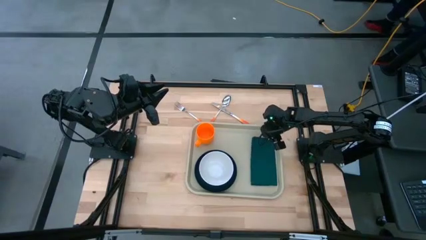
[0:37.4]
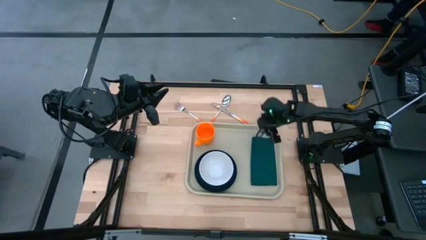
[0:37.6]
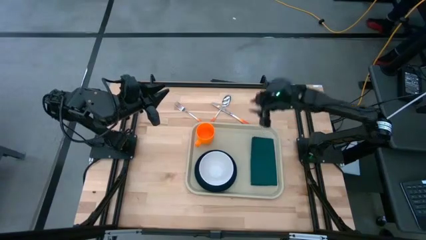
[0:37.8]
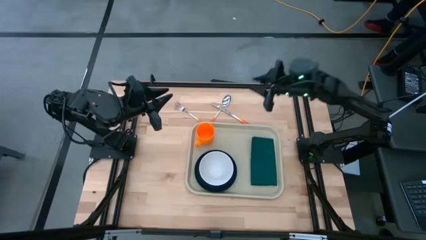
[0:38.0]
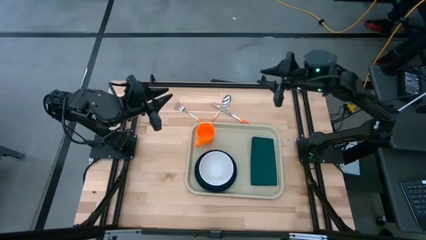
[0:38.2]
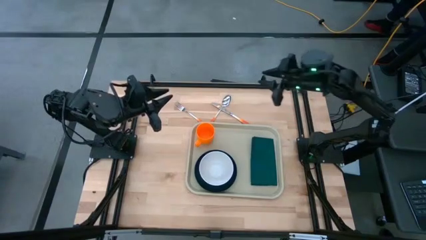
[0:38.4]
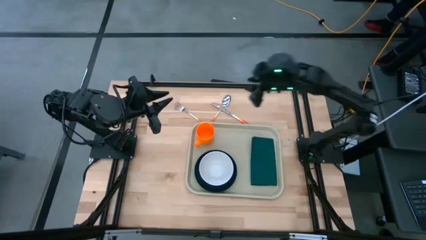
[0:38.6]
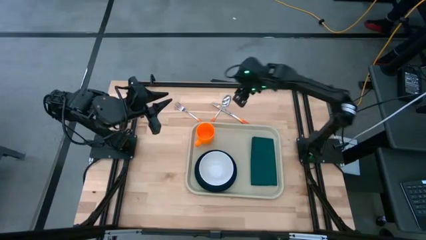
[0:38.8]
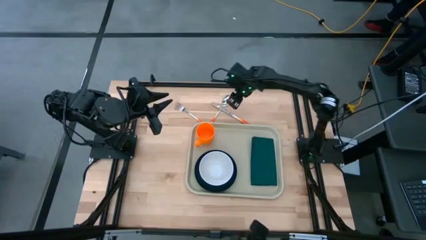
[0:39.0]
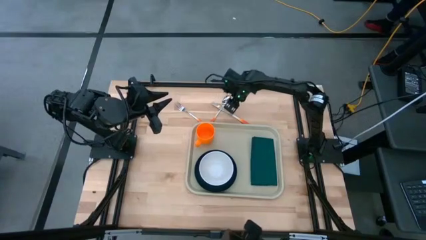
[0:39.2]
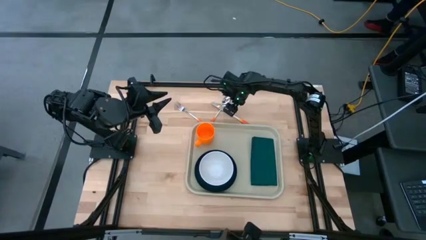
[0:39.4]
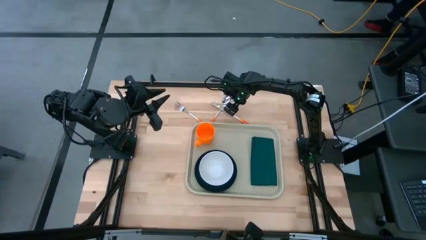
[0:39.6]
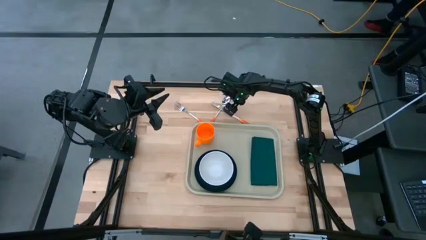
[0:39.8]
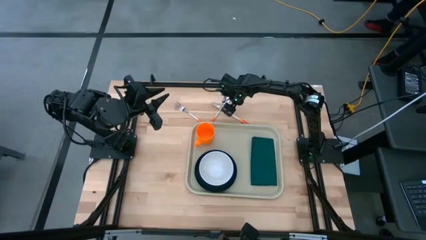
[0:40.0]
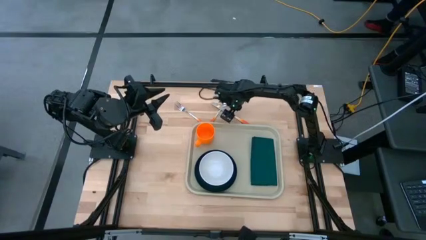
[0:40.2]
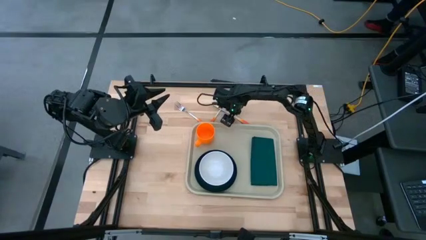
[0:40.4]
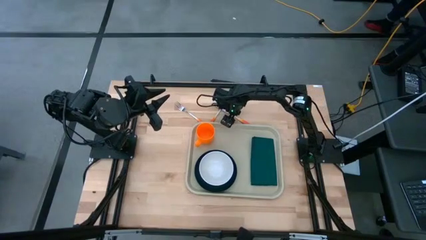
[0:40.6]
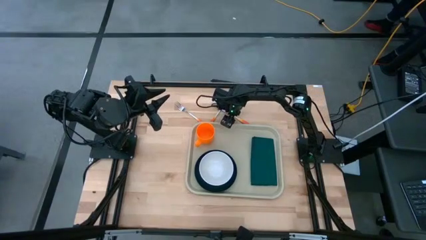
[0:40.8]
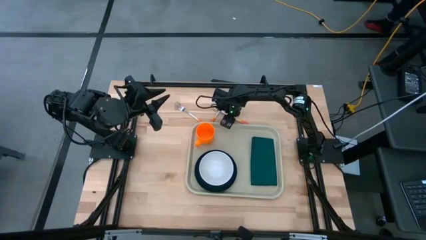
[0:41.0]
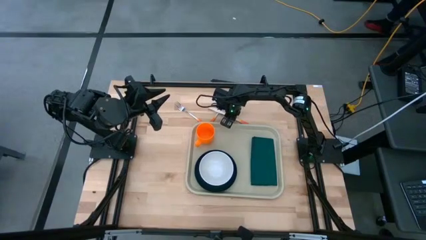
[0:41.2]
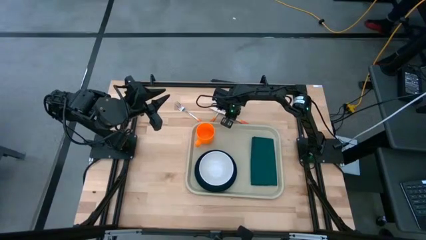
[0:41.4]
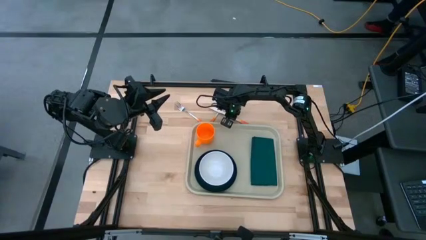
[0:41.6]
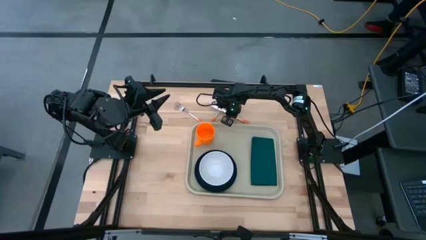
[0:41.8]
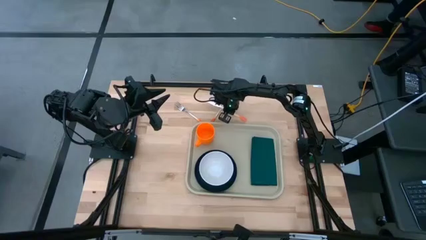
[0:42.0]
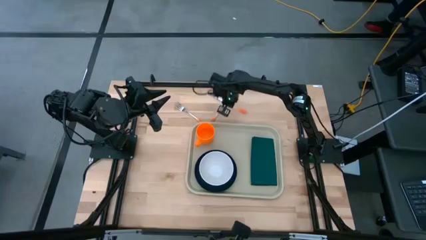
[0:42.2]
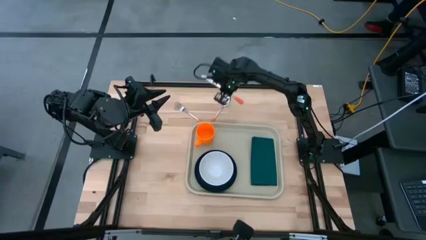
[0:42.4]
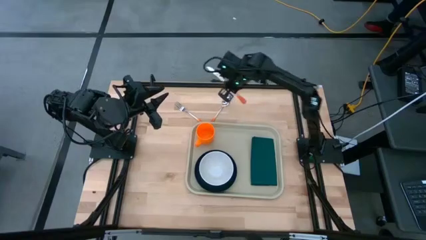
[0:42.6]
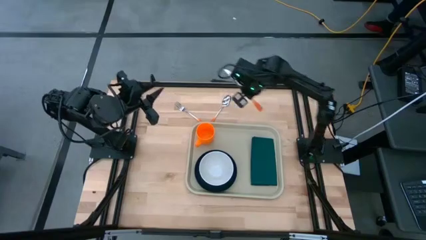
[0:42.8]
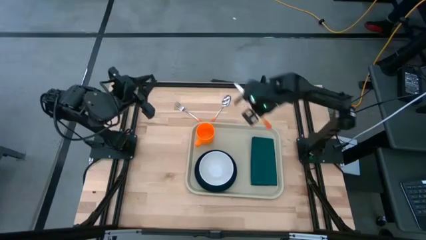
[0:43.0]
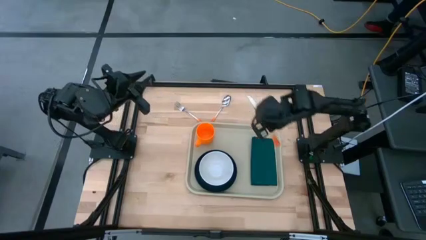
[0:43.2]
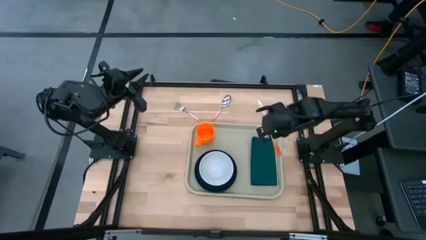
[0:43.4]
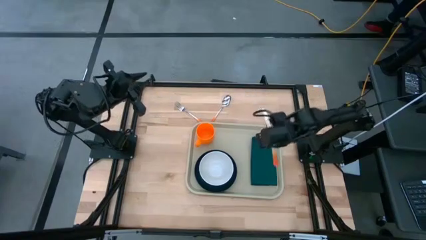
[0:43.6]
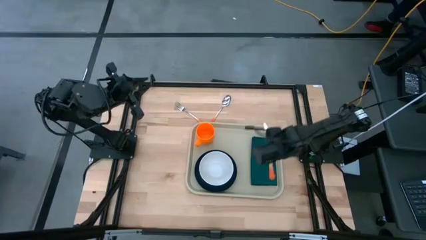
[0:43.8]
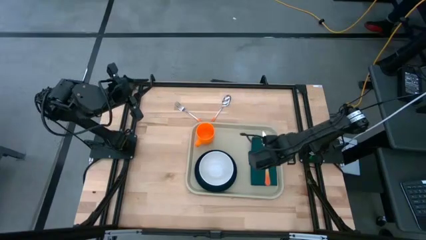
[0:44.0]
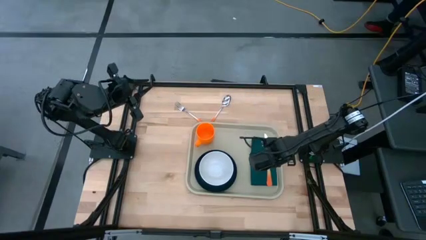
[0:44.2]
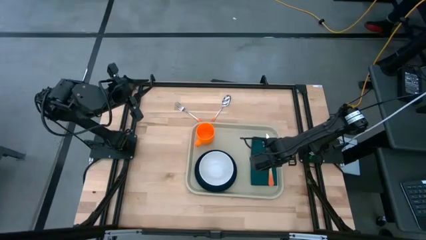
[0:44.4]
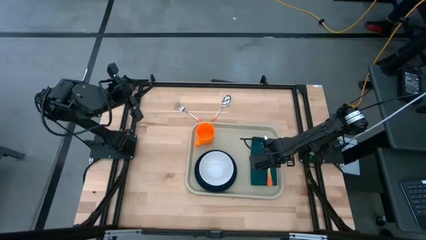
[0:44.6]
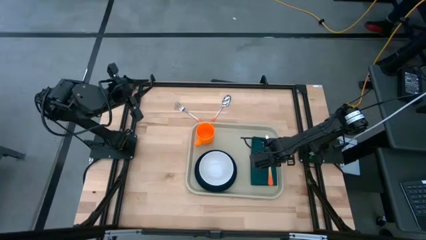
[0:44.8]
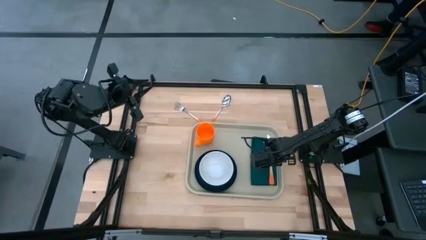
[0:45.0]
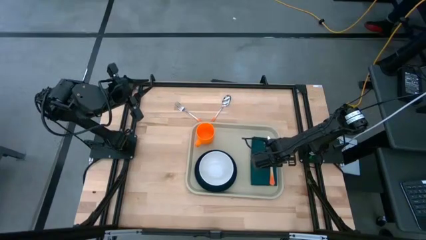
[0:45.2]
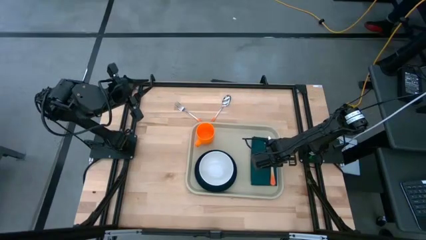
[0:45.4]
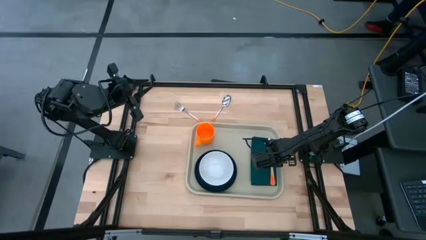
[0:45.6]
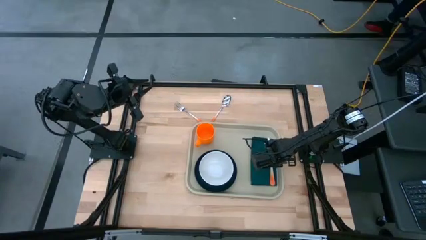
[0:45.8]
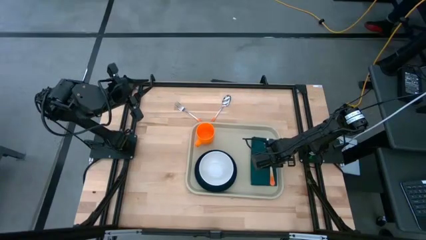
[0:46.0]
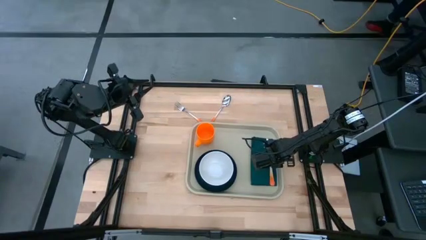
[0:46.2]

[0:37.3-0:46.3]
Task: Set up tray
Put the orange knife on the green napkin

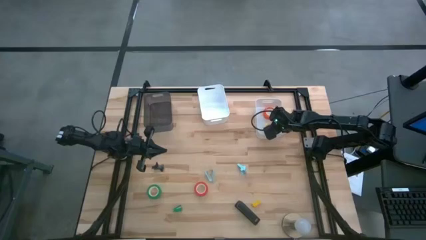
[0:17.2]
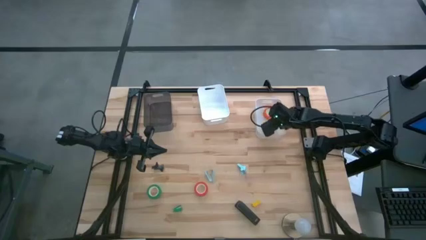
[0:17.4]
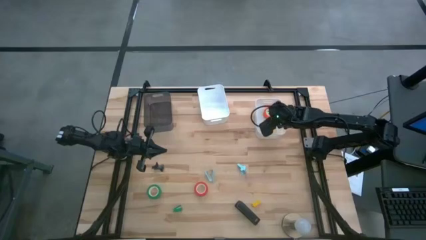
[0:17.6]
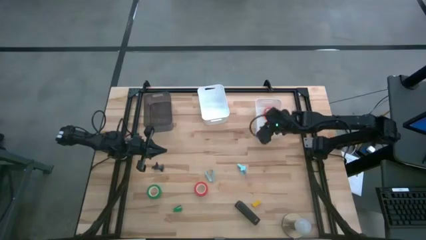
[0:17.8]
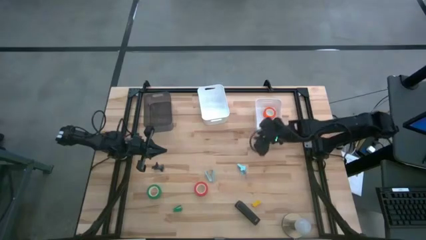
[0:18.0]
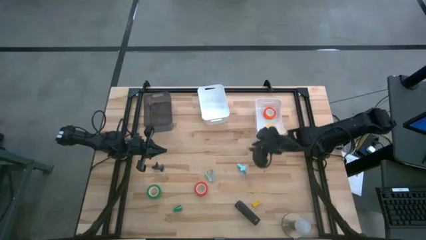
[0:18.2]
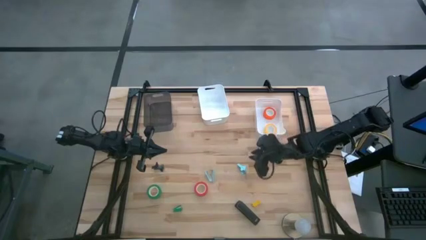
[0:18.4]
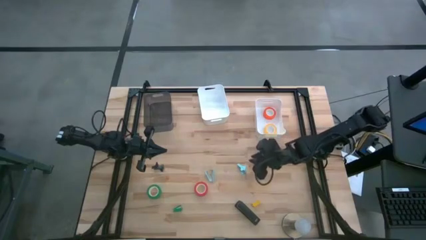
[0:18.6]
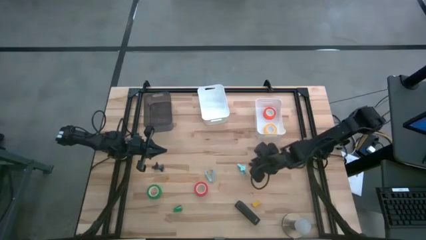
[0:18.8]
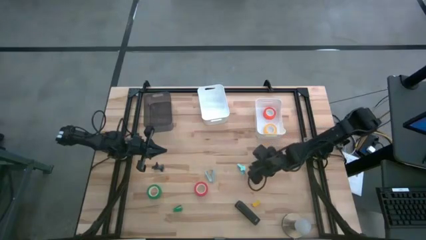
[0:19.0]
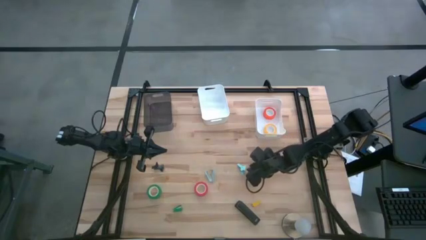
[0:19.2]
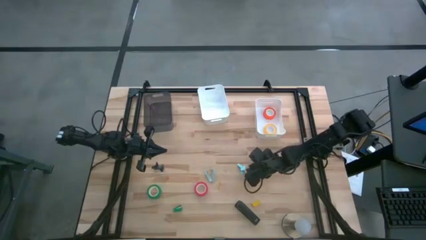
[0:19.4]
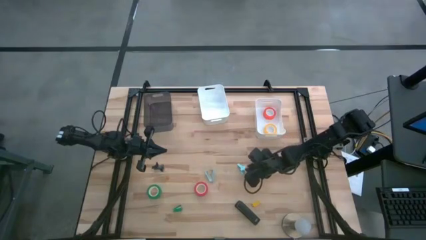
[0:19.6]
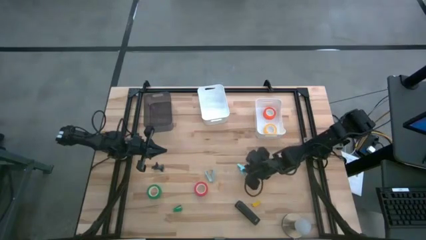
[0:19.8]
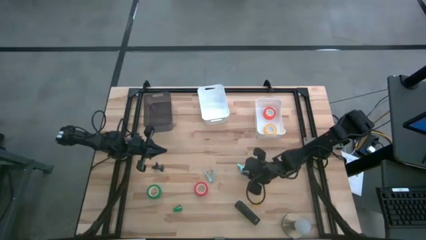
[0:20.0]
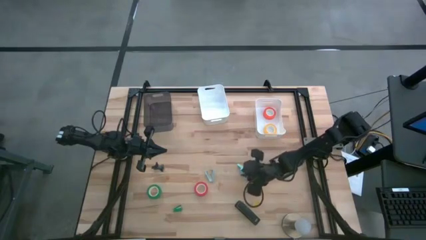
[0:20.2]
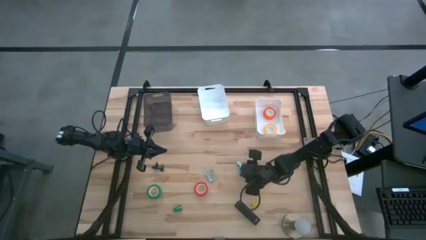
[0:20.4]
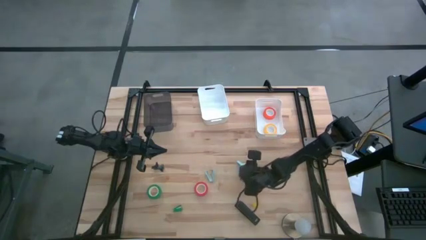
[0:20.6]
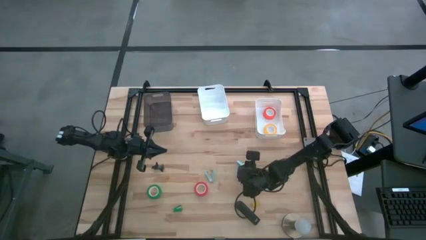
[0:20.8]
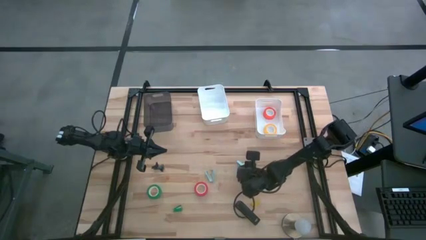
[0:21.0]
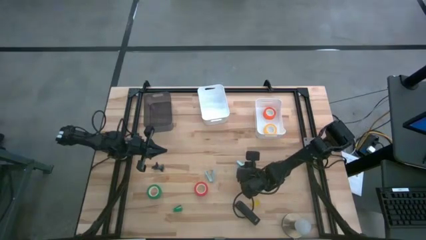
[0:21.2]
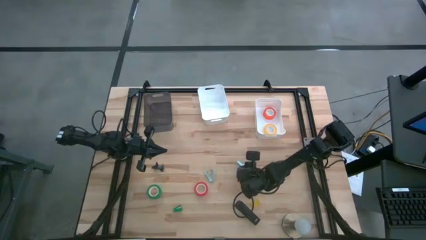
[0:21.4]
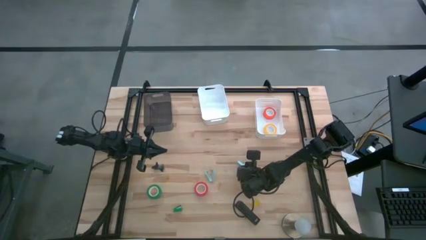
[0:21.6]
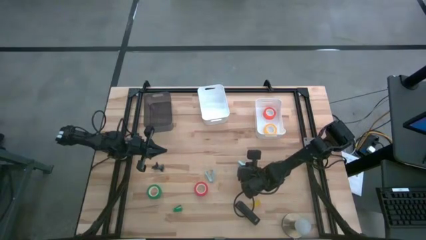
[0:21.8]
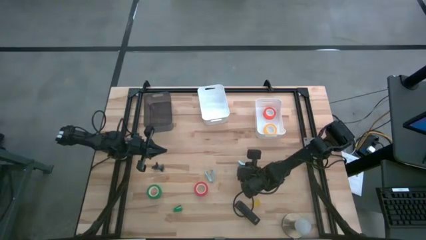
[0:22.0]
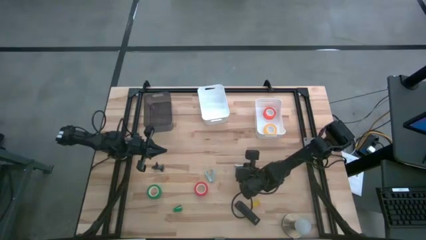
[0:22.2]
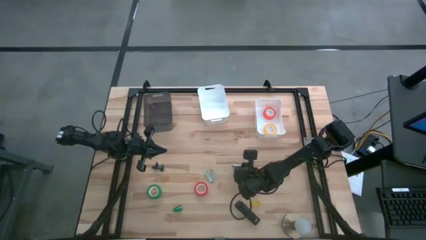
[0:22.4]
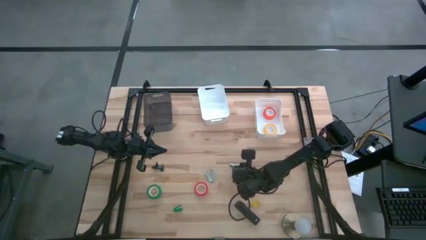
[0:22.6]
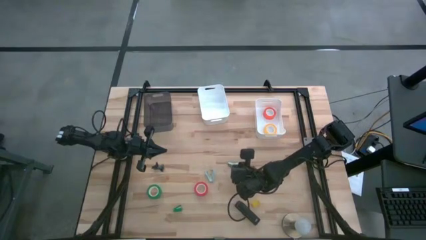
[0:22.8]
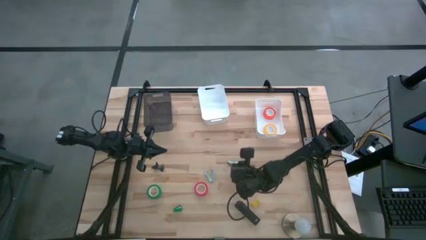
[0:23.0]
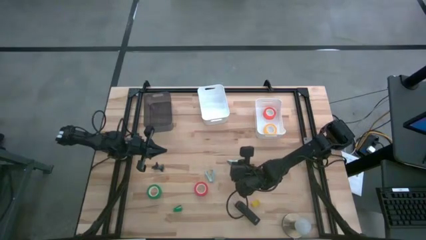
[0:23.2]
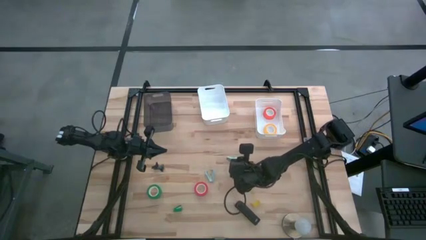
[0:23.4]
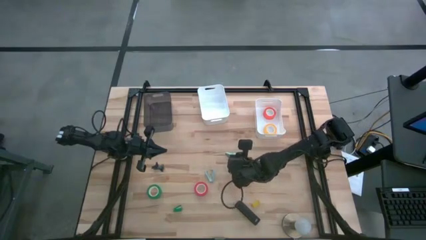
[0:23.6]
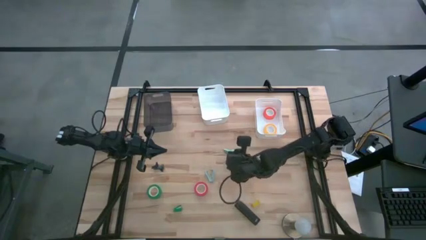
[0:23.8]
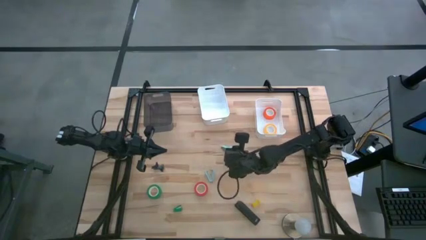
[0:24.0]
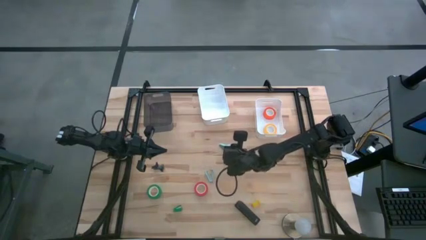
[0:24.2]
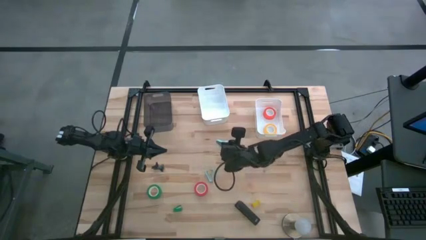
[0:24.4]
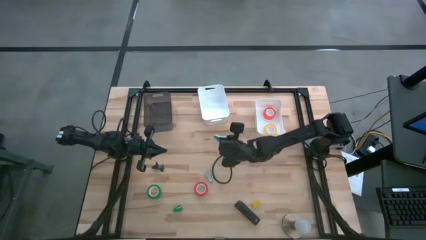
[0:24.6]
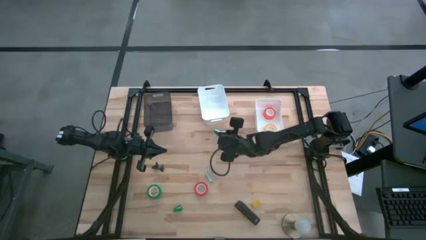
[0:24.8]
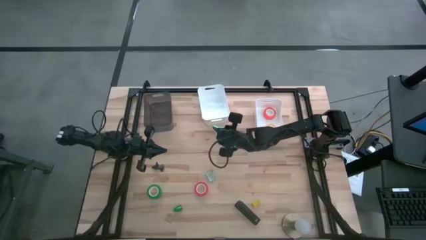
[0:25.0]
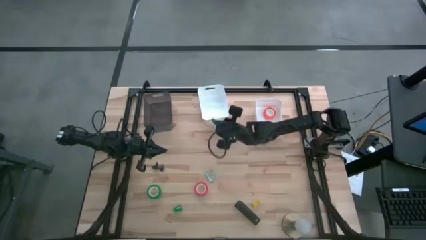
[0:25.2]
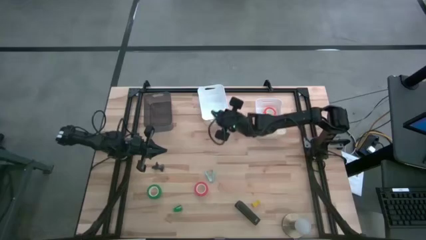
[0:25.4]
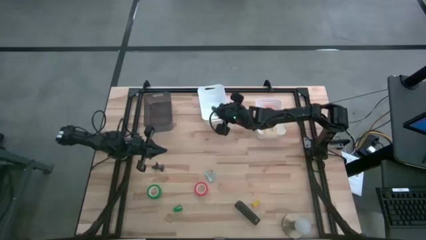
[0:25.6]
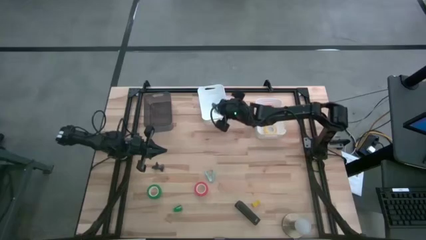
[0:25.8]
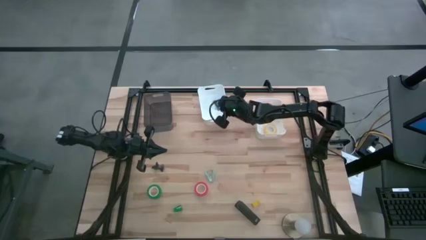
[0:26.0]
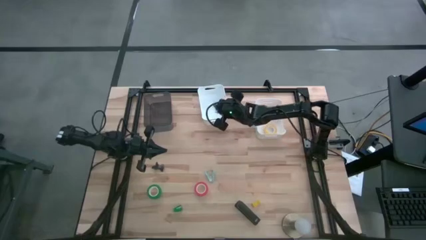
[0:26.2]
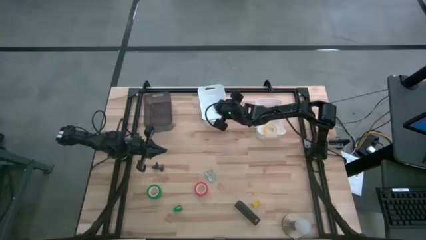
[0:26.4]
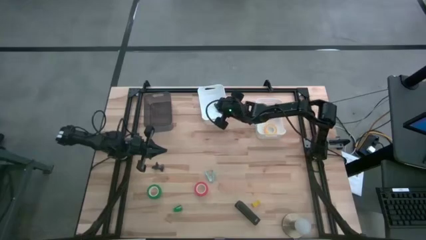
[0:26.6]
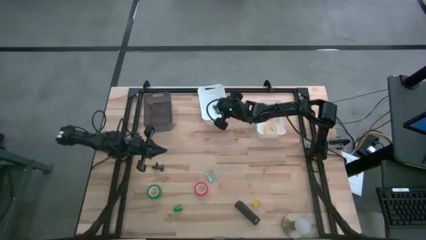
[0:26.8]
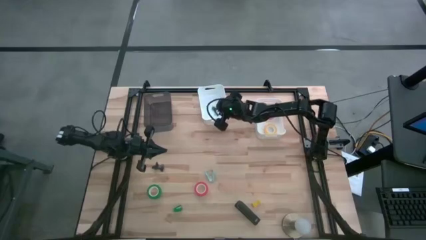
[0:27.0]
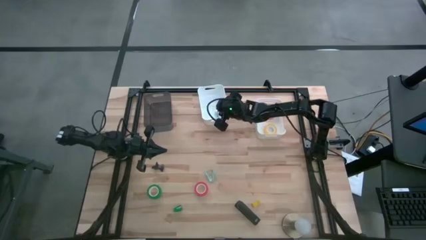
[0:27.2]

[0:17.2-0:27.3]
Task: Pick and place Stapler, Stapler remover, tape
Put the light blue staple remover into the left white bin
